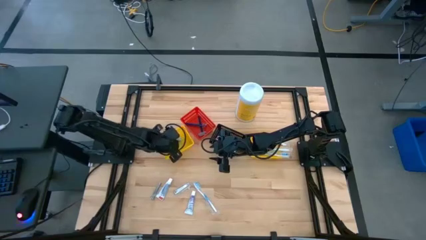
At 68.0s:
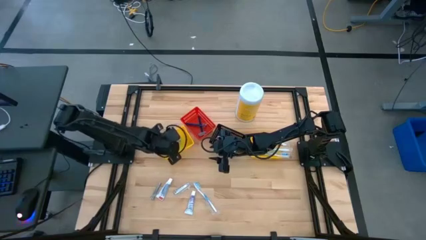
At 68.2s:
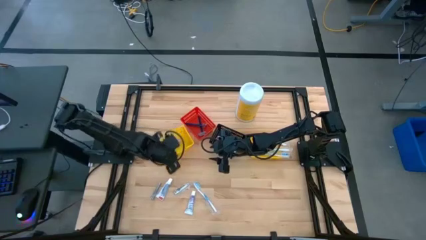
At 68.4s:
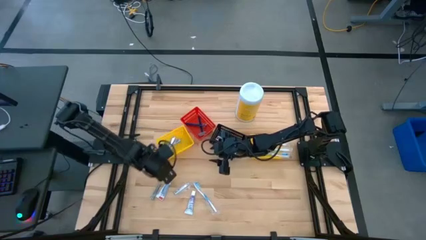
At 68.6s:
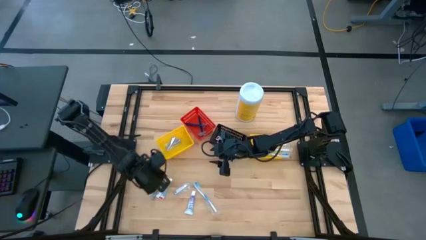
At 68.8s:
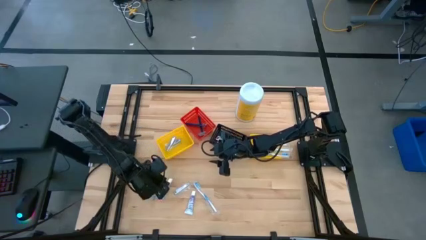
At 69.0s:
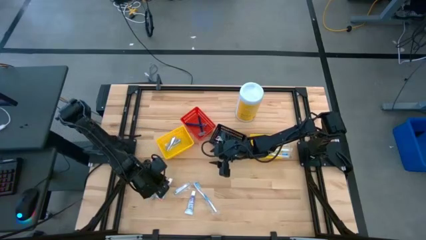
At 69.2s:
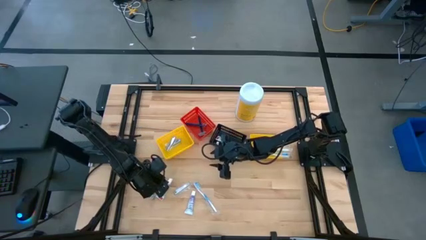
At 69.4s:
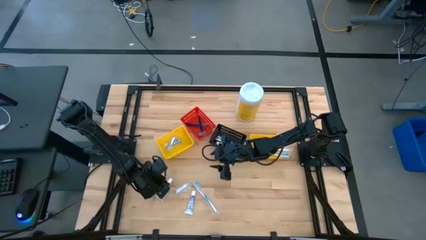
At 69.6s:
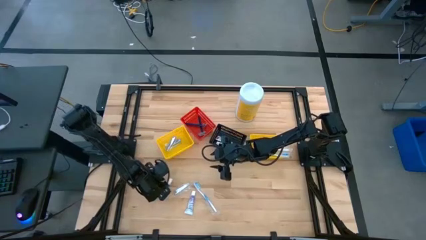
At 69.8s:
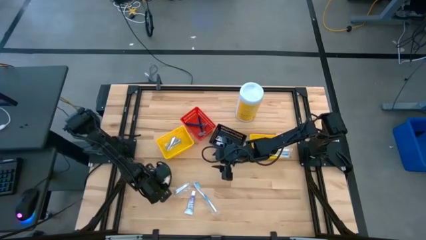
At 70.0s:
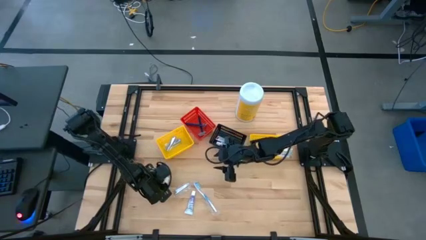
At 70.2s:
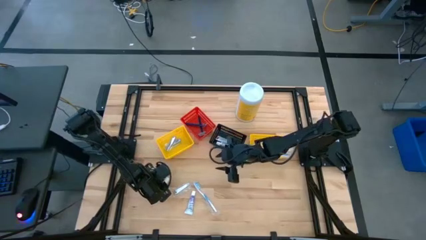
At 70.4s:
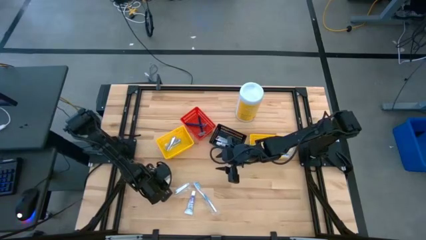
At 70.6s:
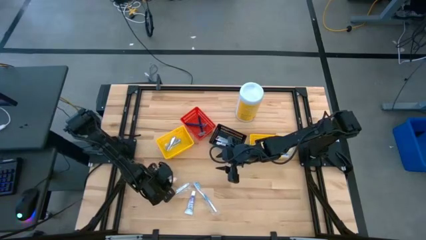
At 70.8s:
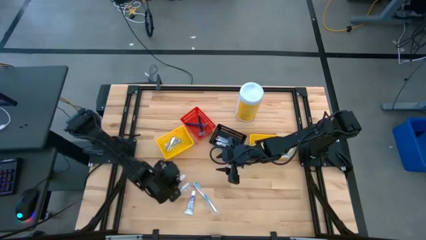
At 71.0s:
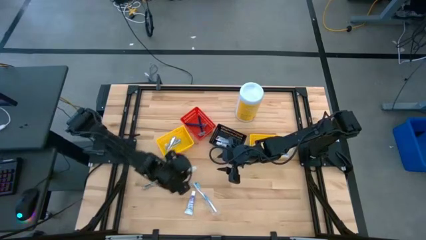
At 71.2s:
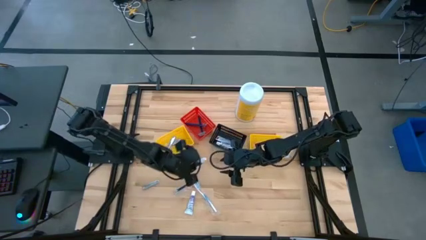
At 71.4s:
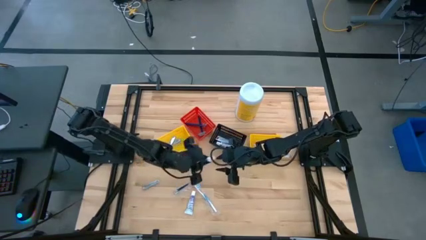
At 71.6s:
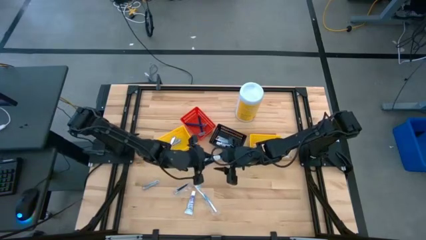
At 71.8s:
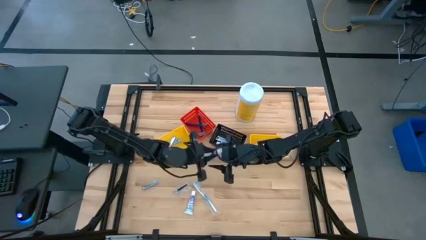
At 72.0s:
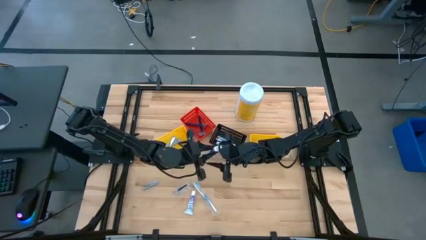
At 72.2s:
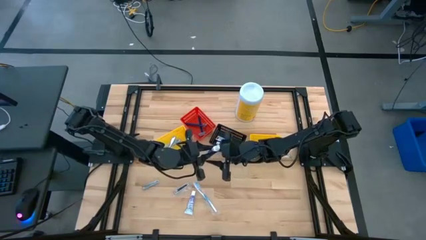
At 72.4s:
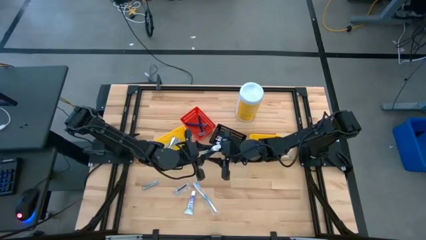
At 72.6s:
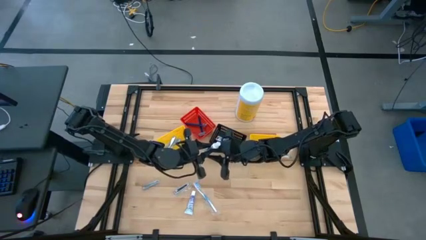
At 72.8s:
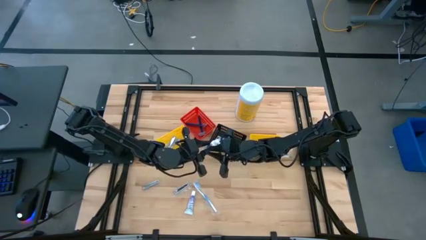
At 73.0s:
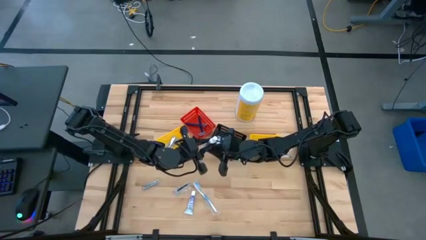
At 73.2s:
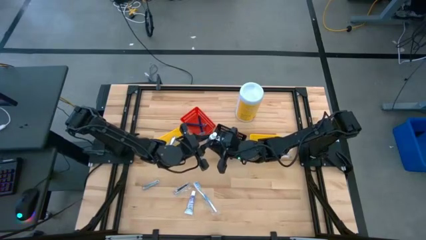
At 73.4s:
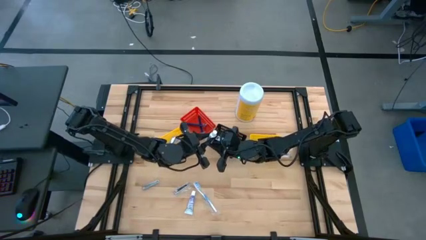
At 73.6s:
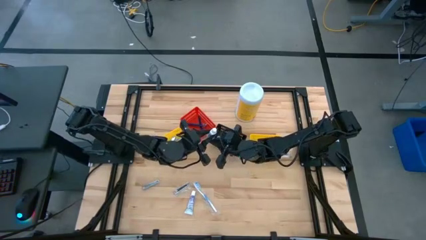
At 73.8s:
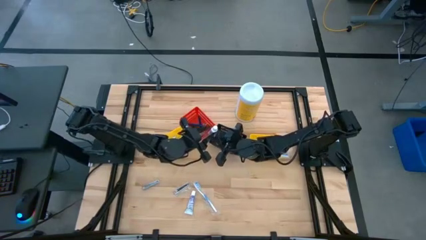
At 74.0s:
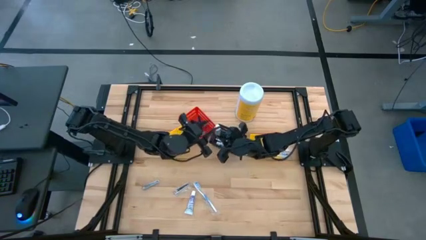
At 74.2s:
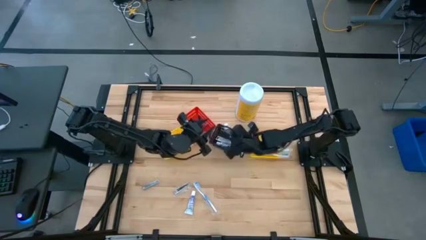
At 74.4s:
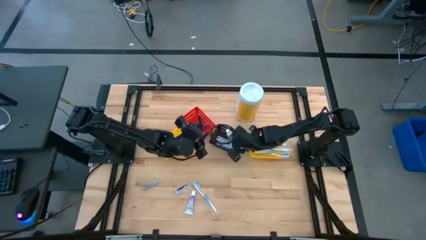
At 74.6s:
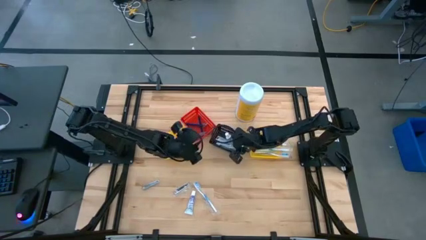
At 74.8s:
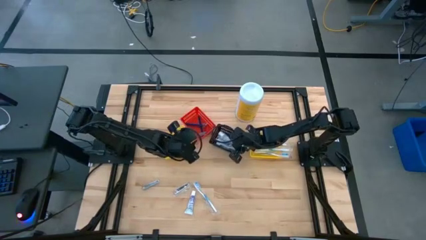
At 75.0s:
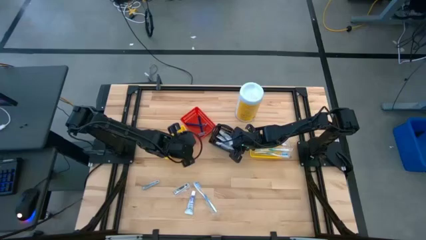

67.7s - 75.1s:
Task: Pick & Place Travel size toiletries
Put the toothpaste into the black bin

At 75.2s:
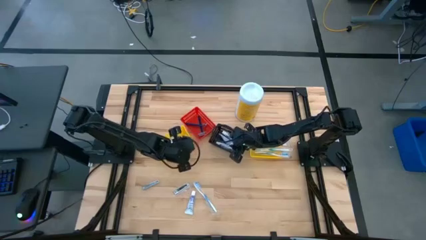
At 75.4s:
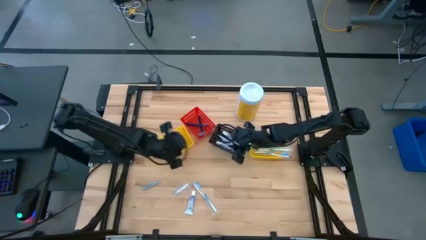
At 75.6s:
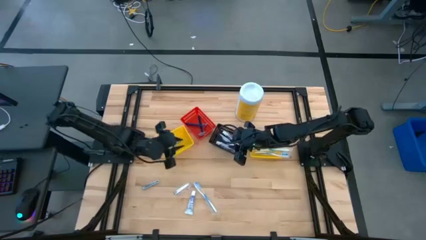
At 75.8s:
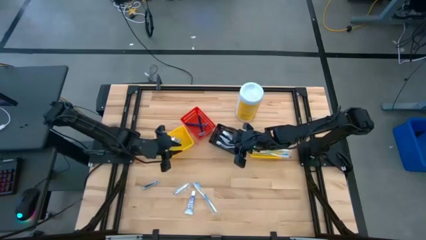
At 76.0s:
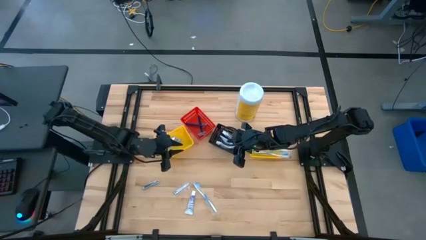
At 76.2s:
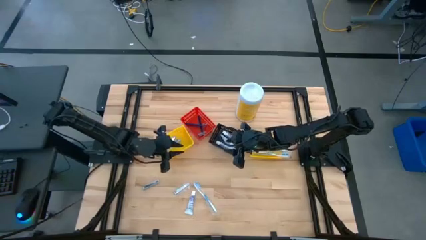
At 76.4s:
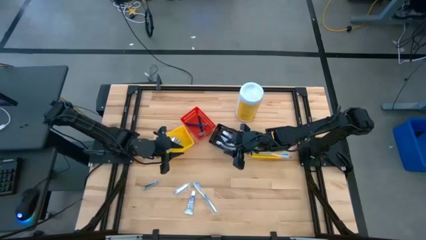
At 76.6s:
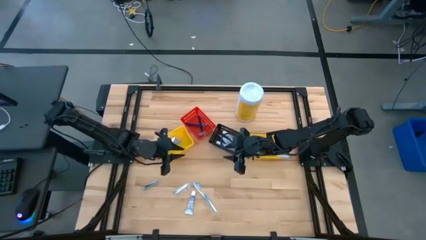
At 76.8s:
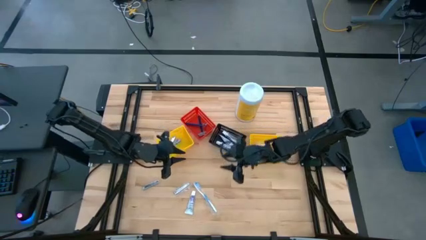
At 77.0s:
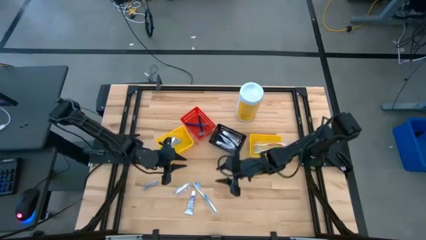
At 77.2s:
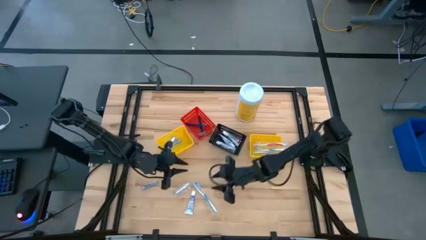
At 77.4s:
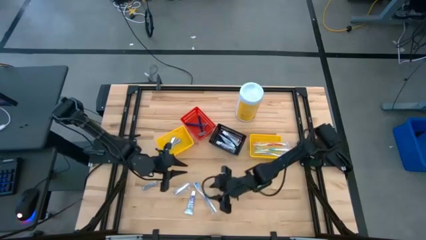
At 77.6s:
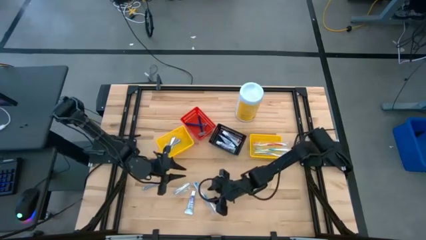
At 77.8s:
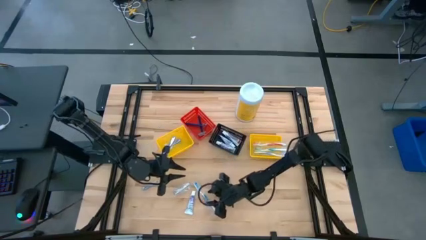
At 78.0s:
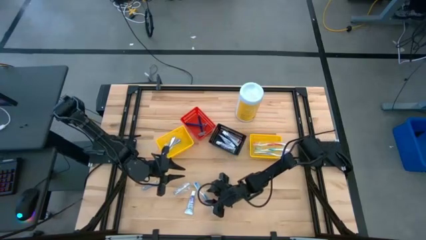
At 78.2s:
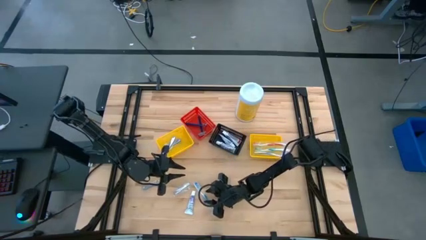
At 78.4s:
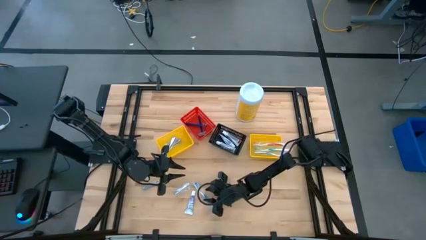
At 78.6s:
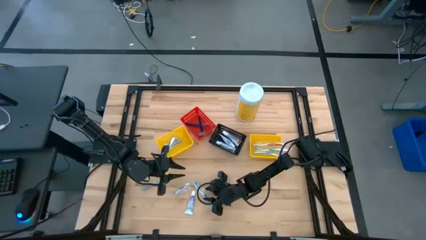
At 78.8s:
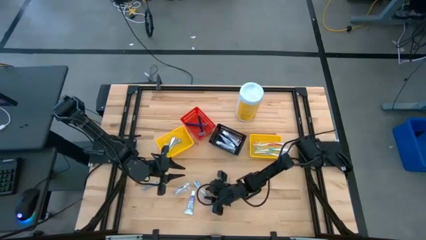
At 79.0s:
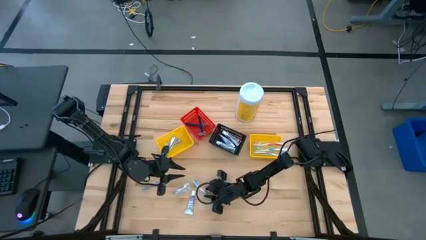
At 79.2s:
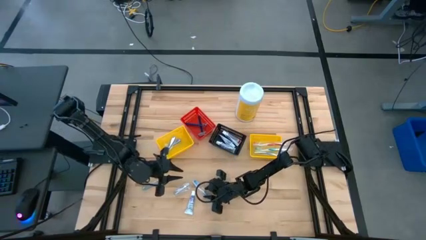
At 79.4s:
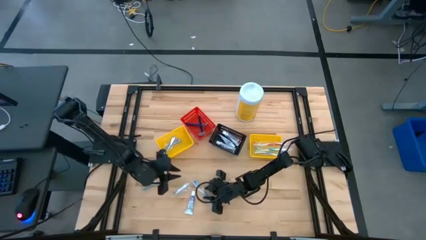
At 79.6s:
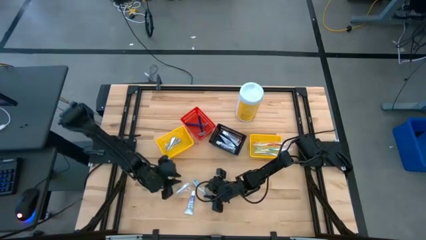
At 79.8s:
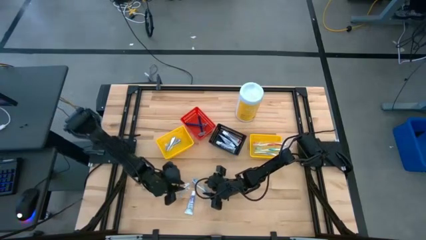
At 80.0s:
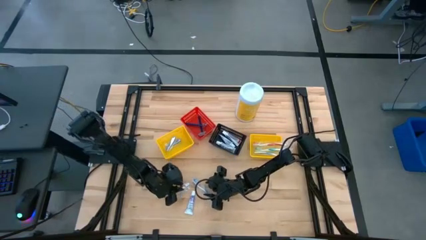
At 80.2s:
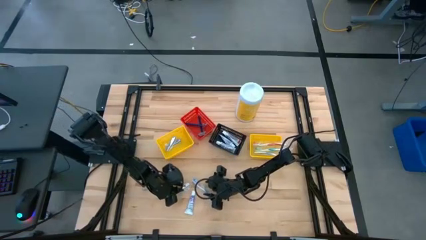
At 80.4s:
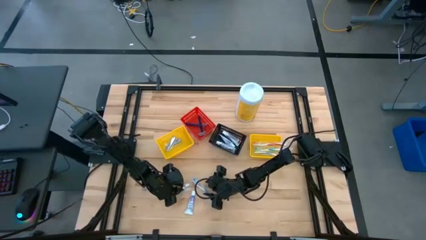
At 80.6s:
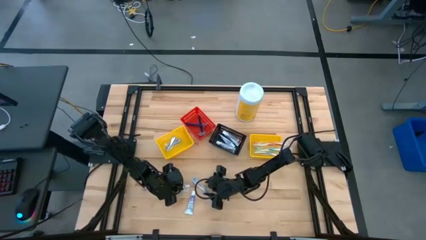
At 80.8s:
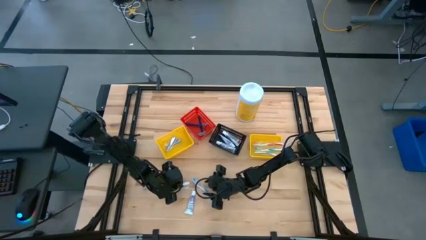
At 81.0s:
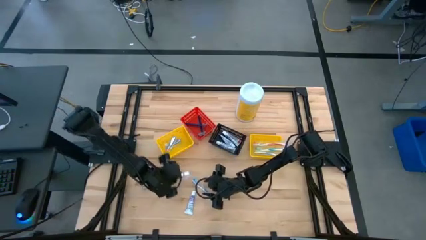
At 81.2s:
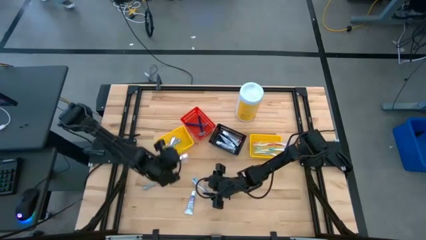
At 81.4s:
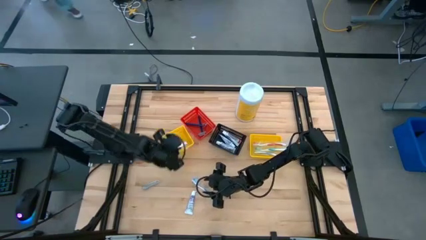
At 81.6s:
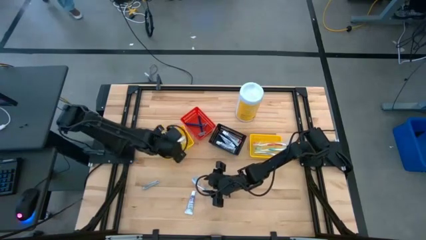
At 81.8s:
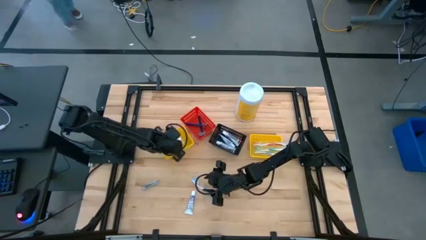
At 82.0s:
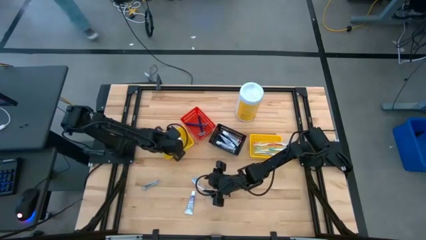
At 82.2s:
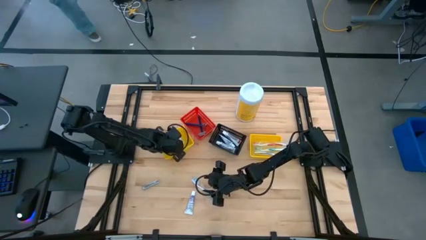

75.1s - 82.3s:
Put the nail cutter into the left yellow bin

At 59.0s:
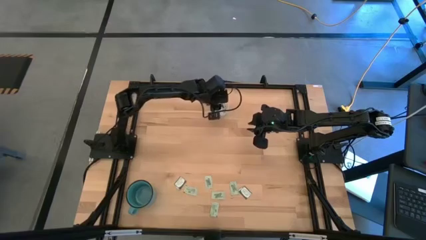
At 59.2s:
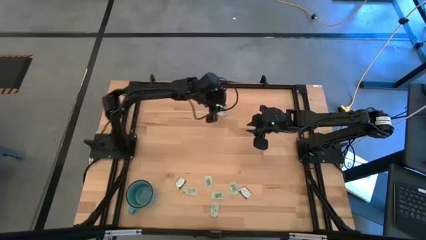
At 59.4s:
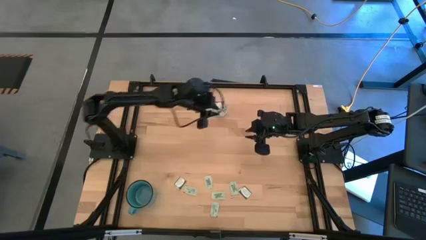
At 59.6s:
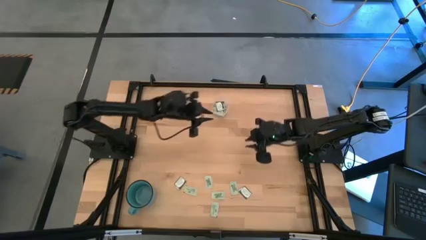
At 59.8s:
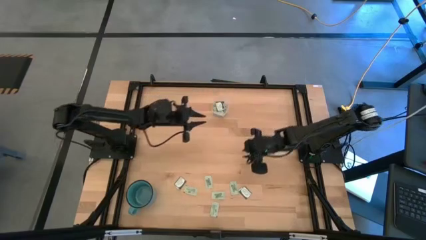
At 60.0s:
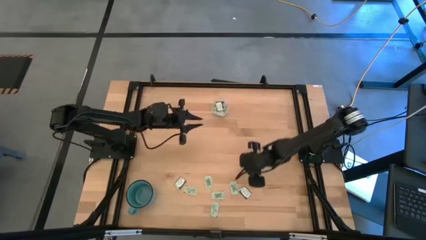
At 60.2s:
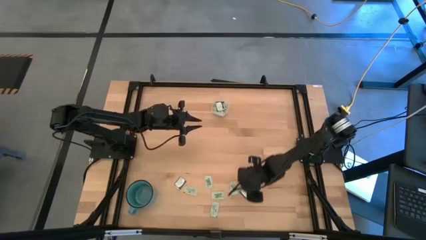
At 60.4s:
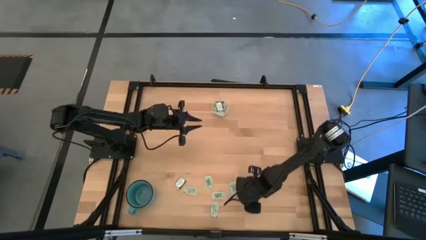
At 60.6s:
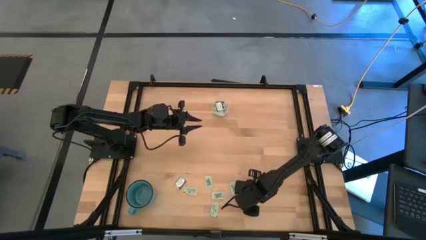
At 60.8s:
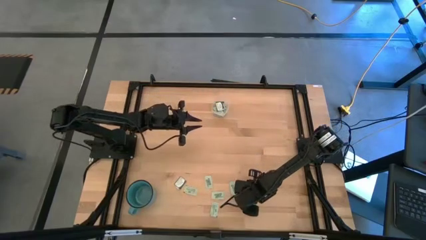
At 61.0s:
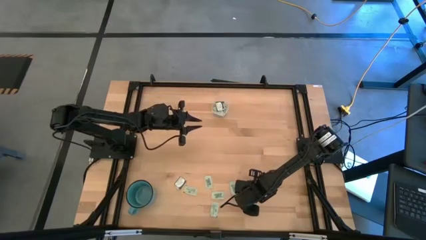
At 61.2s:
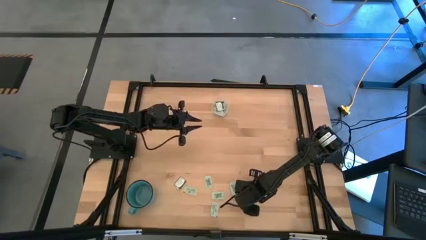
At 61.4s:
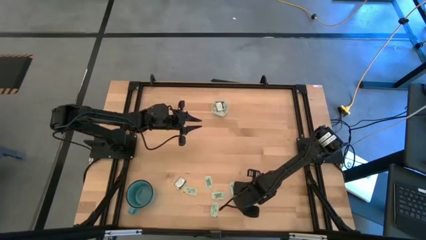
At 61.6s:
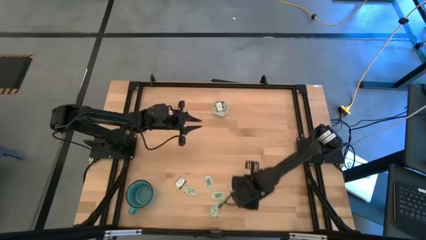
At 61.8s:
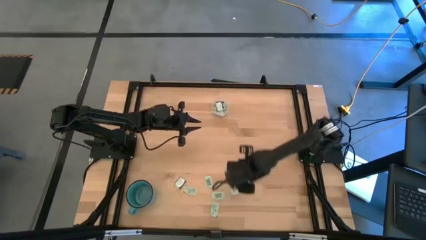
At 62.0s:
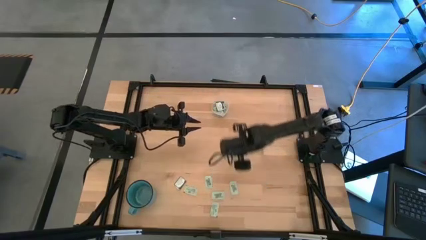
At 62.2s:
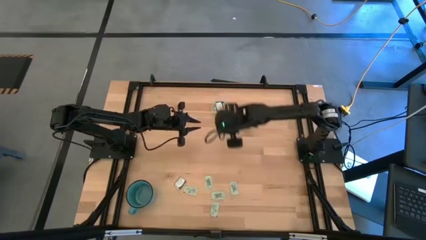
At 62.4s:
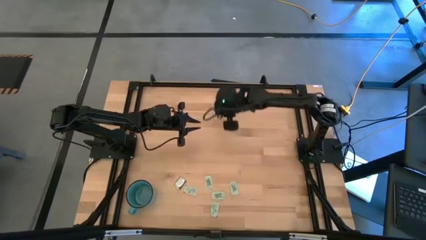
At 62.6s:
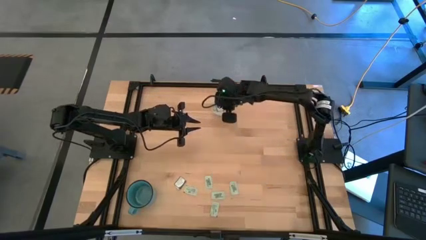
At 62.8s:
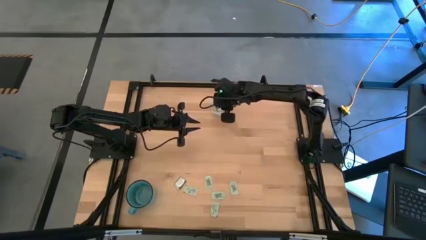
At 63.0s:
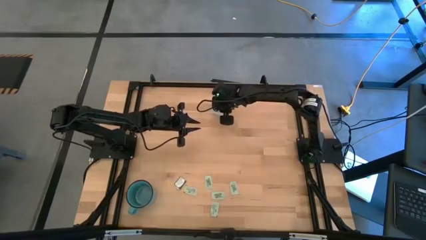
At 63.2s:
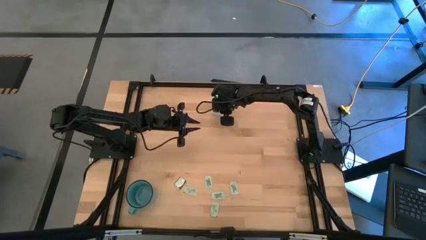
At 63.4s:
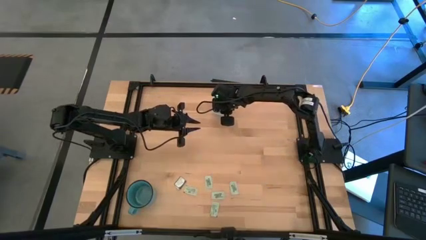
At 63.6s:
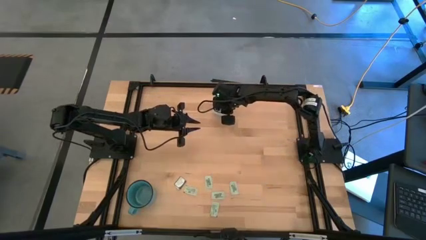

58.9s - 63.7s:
Task: Pick and place items into bin
Put the green stevia packet into the transparent bin
